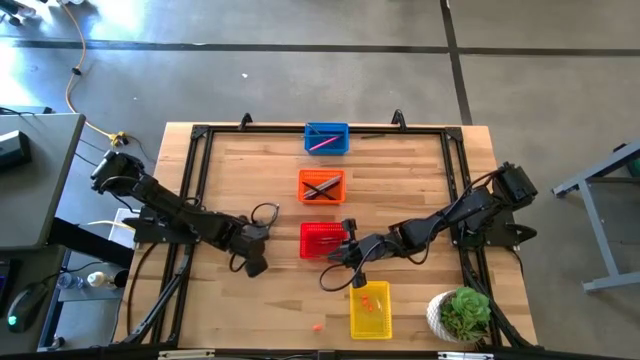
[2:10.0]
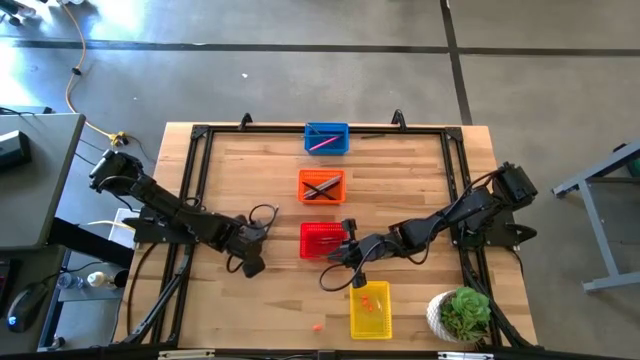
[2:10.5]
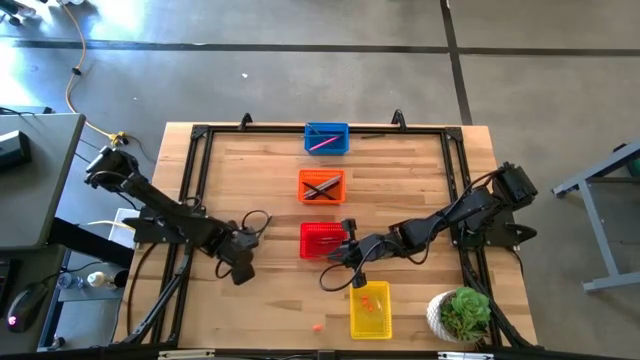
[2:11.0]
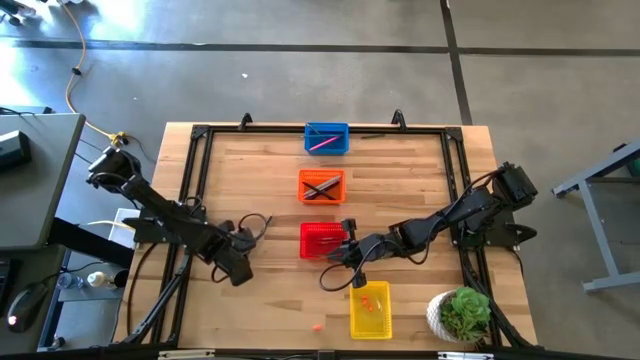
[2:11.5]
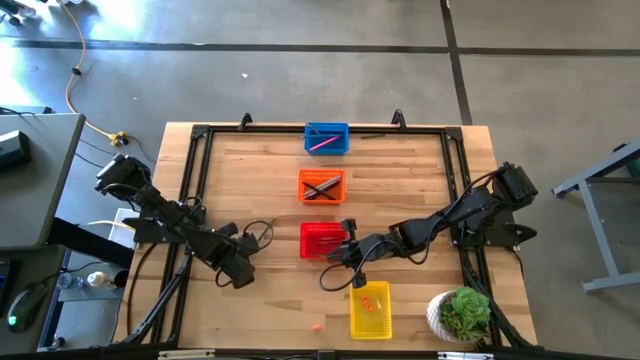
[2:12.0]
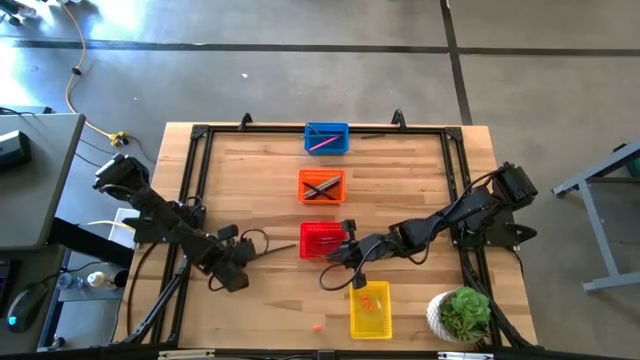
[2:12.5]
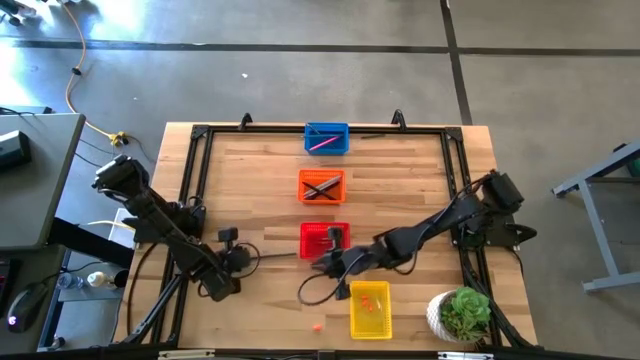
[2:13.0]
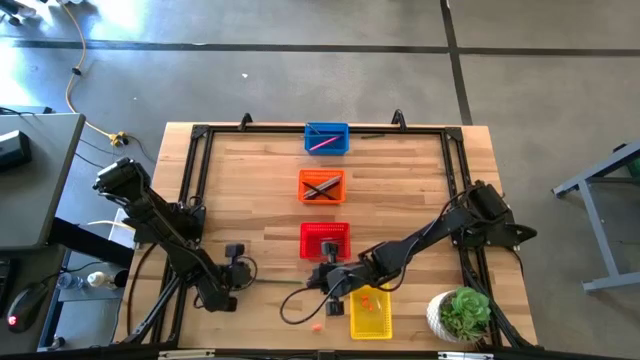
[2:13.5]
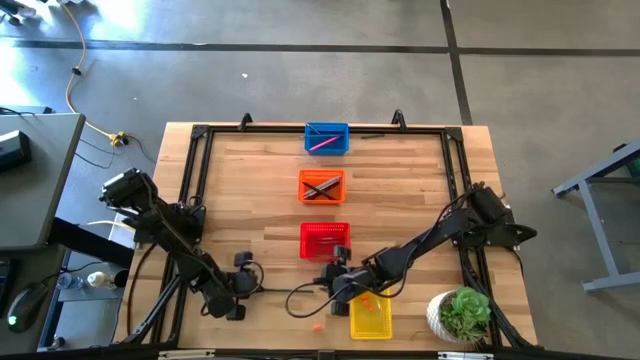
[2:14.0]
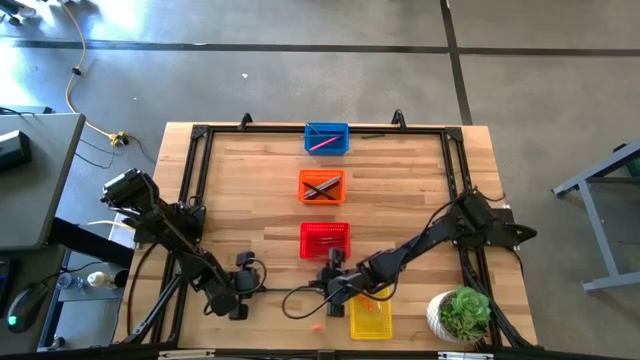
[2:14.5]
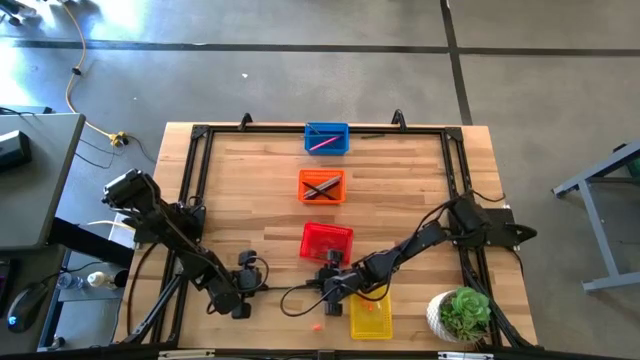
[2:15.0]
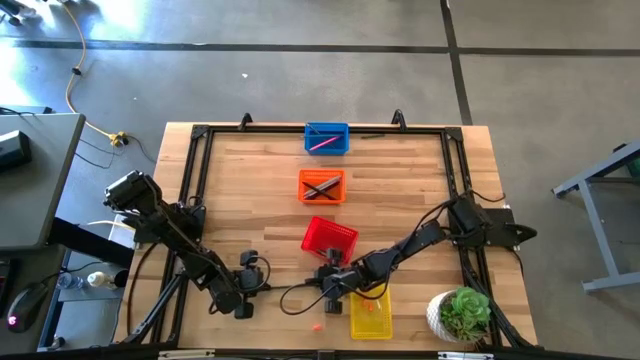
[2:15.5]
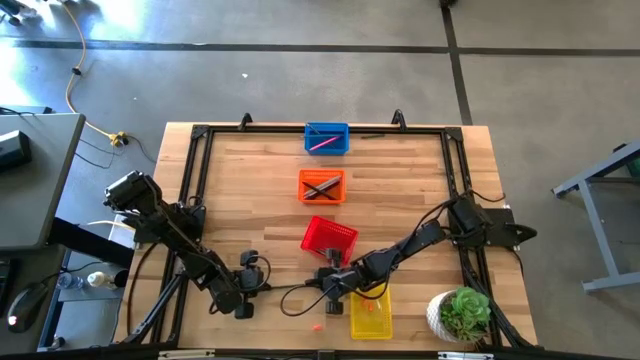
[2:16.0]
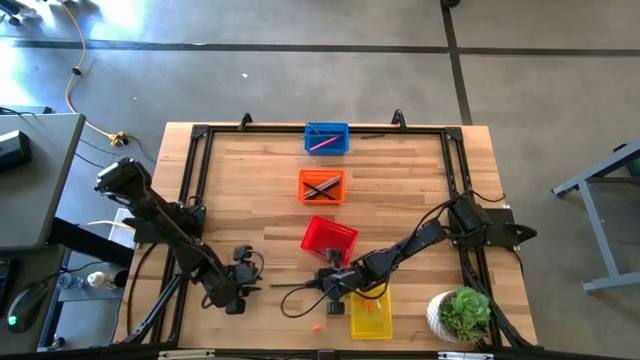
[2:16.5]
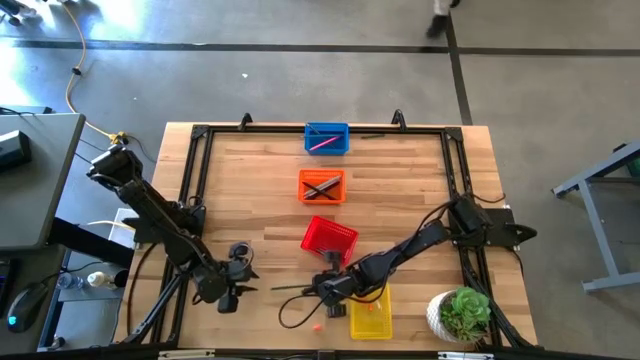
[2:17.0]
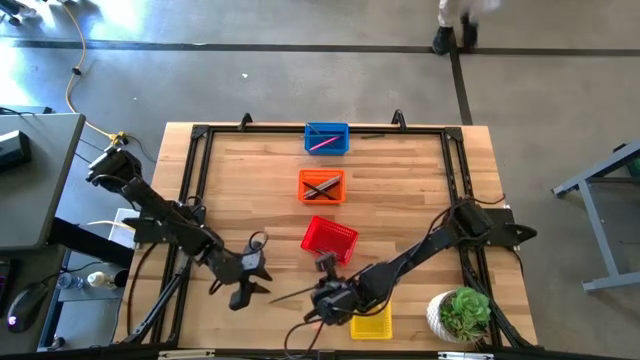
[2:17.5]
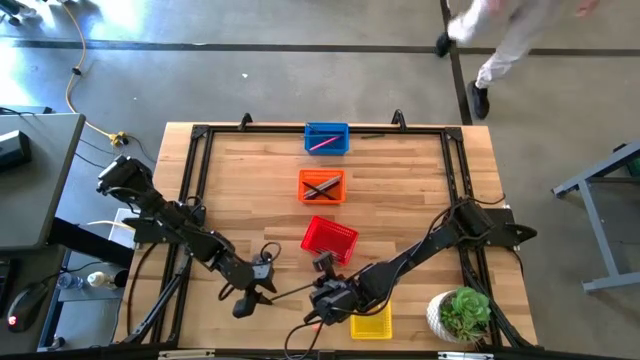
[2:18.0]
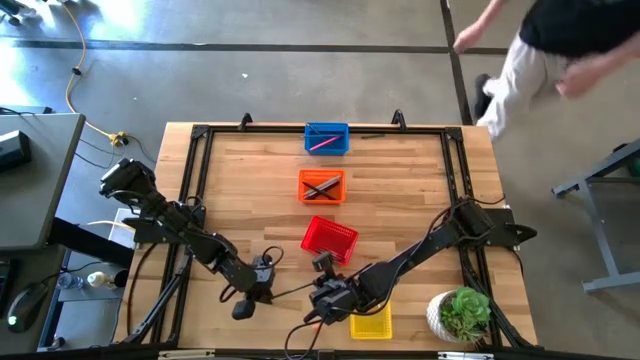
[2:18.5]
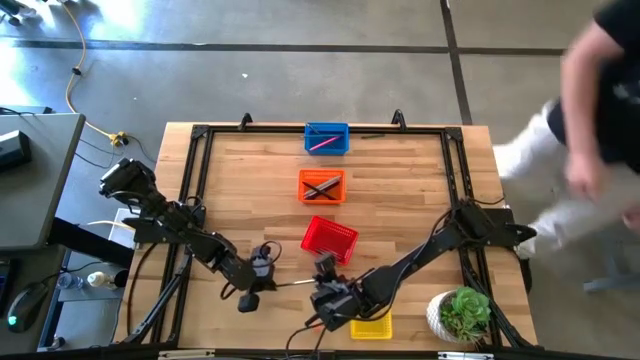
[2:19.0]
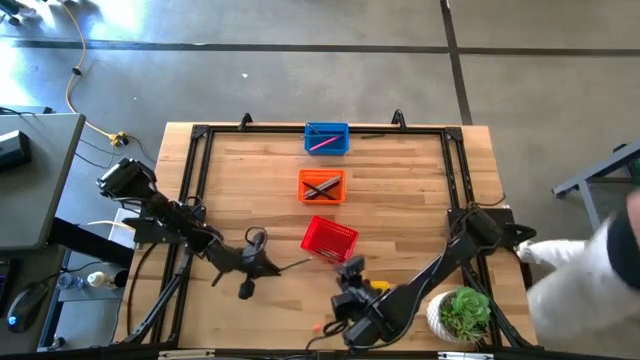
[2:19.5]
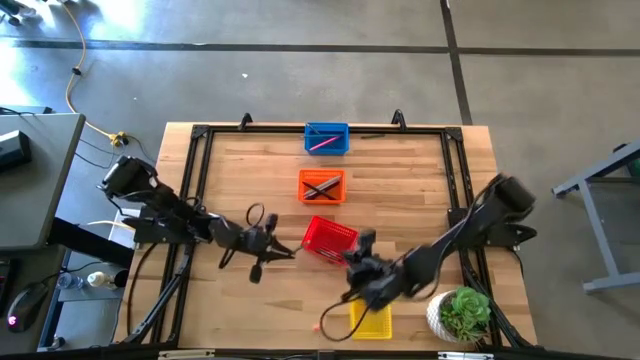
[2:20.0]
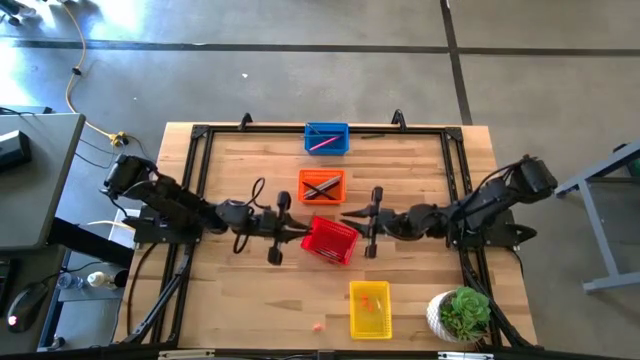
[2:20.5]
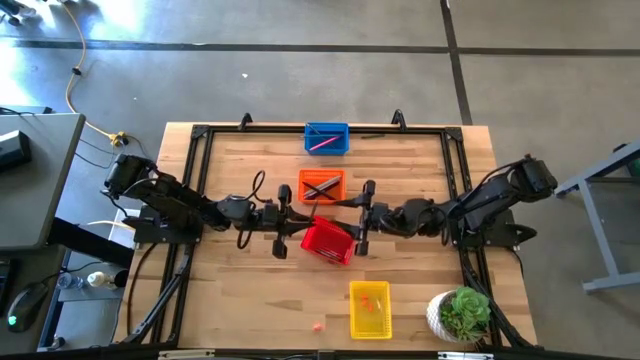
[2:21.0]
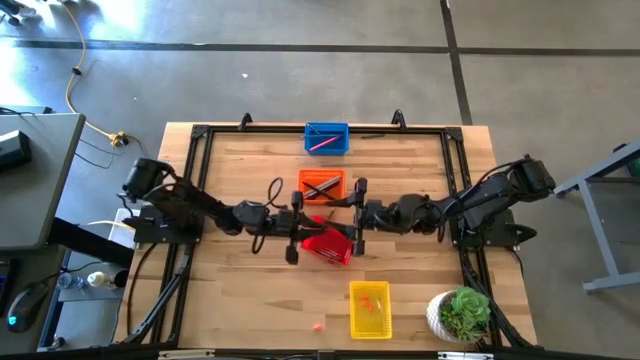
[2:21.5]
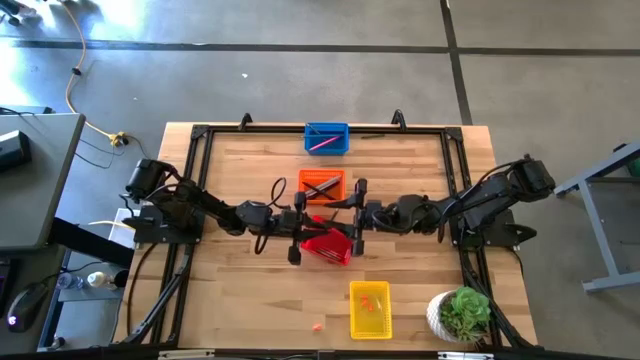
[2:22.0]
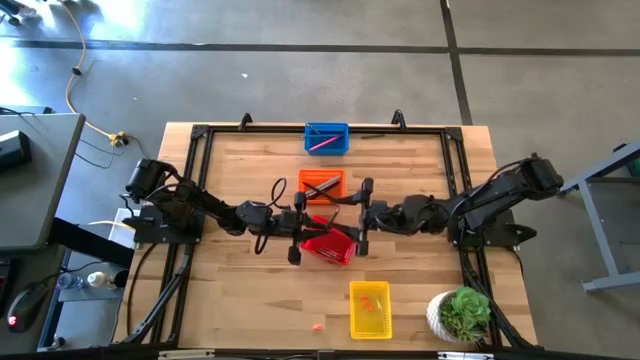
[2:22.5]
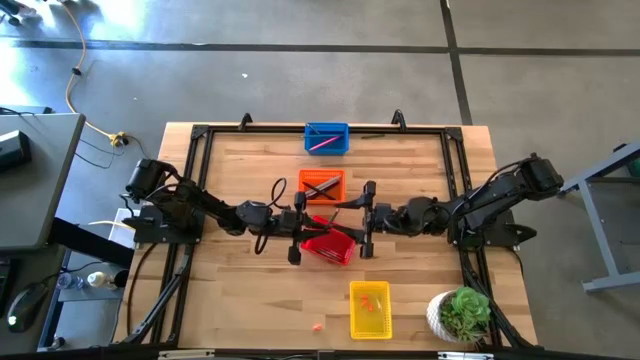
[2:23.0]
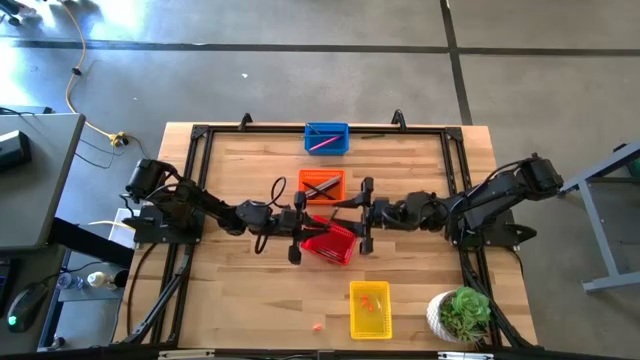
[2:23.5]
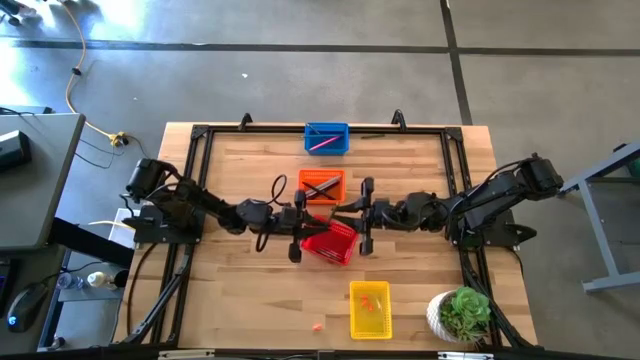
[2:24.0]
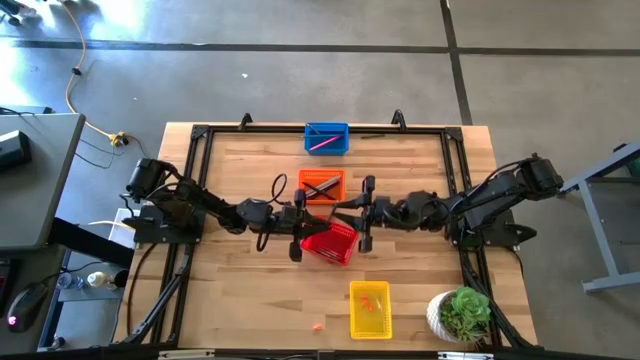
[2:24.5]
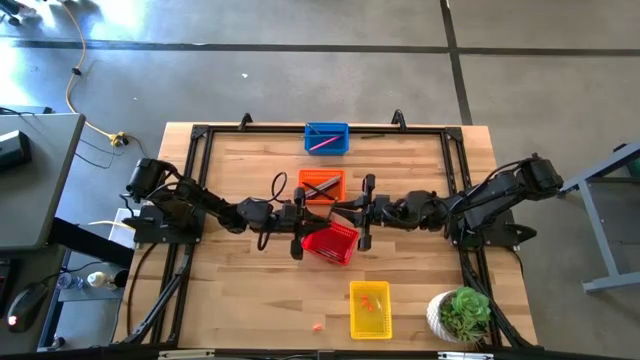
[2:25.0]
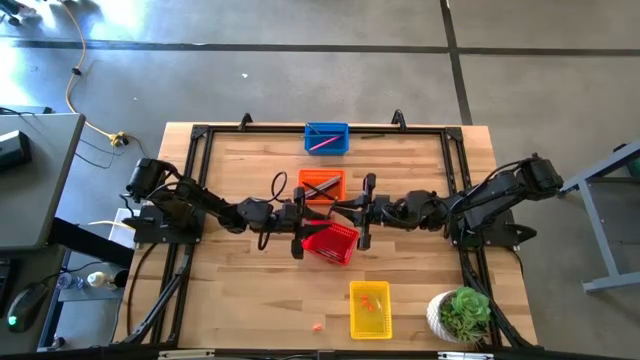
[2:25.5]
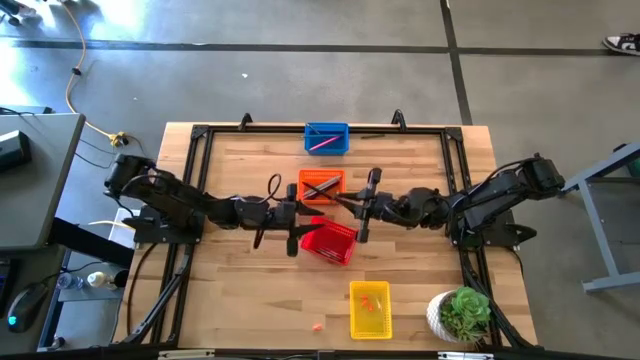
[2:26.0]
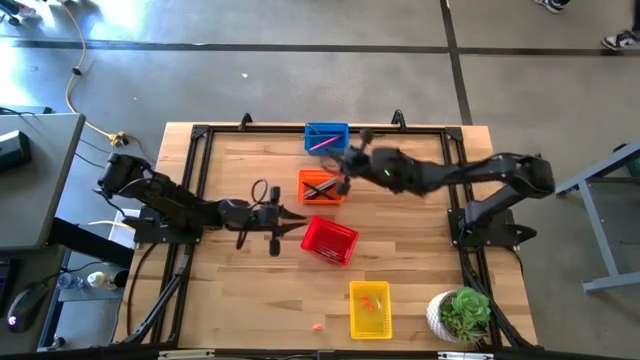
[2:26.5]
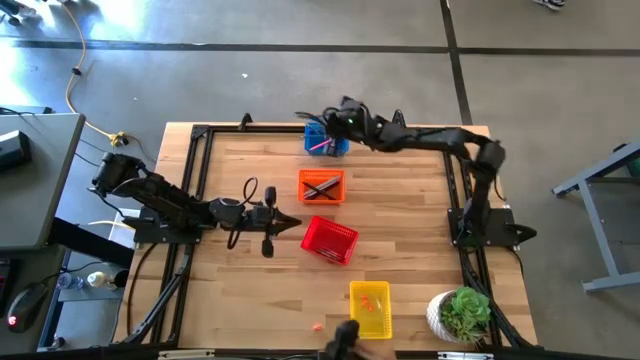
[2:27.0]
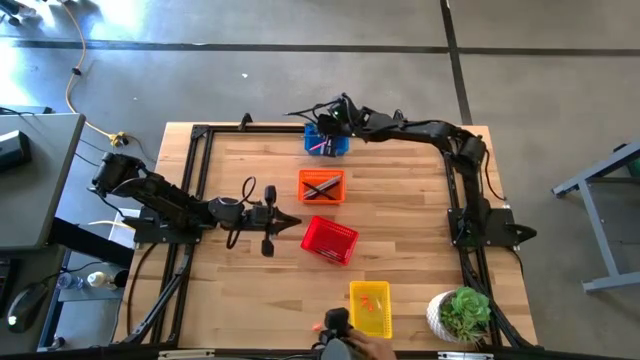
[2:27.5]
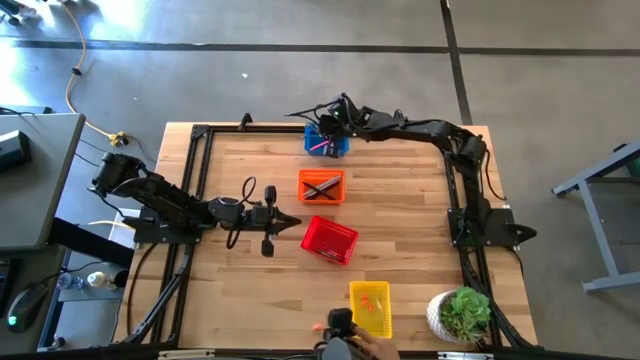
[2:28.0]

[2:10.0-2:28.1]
Task: Sort crayons/erasers/pens/pencils in bins
Put the green pencil into the blue bin

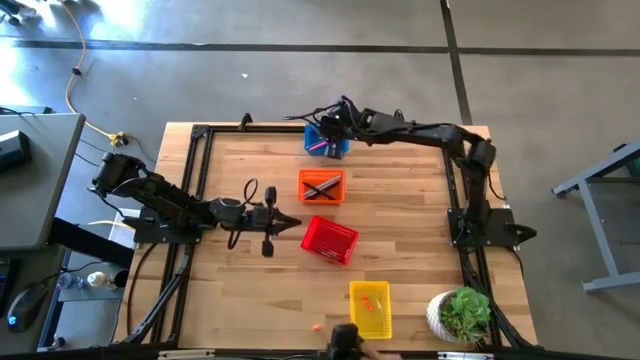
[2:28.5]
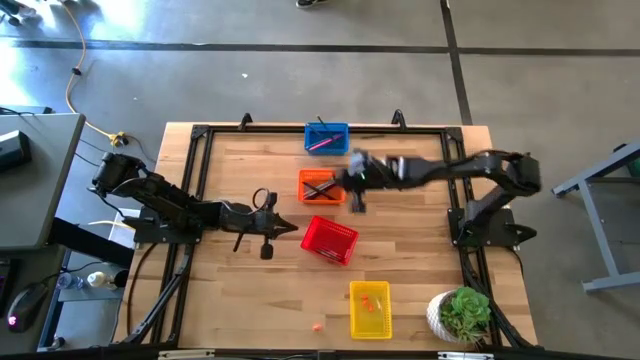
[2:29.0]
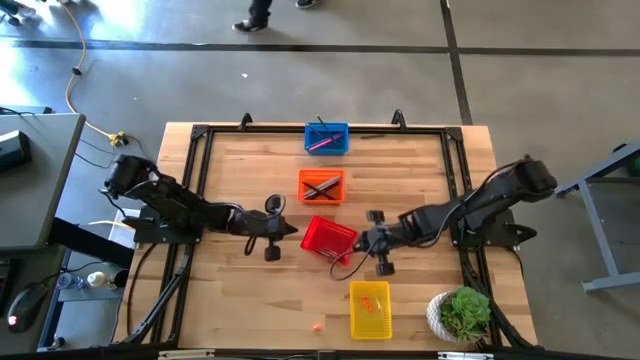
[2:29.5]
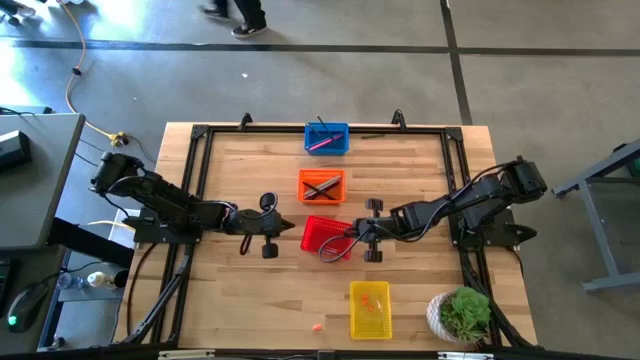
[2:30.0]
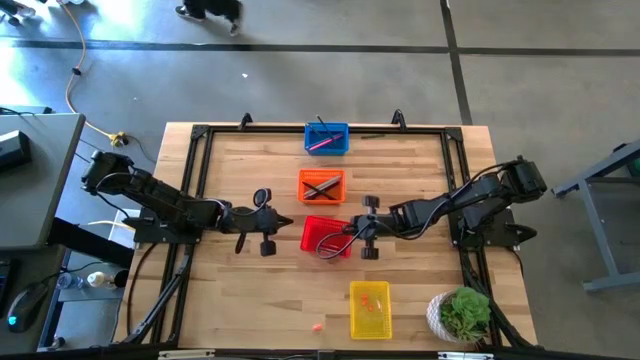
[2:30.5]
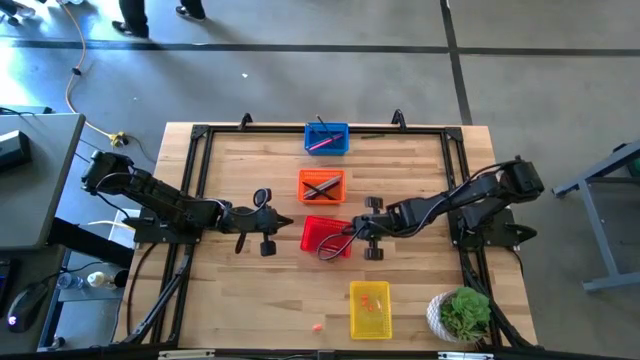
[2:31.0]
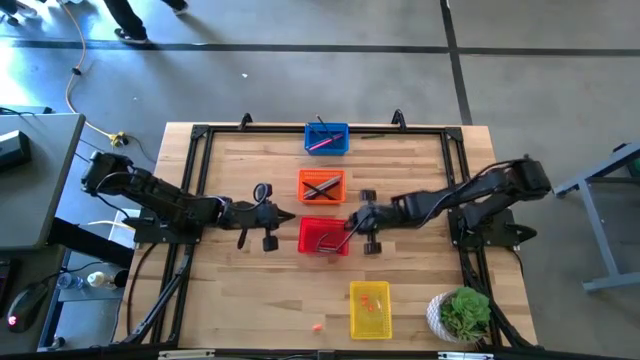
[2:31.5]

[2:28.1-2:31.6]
Adjust the red bin

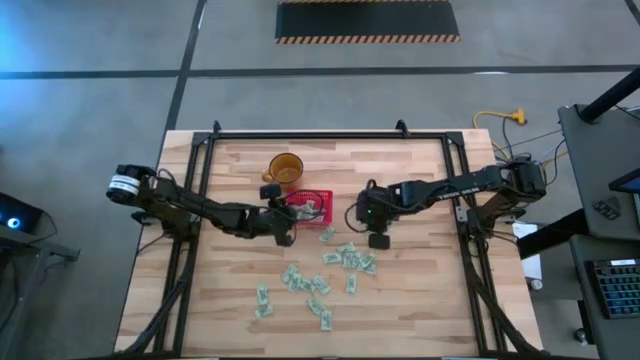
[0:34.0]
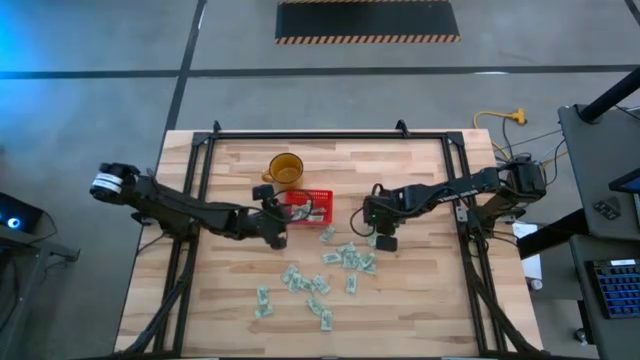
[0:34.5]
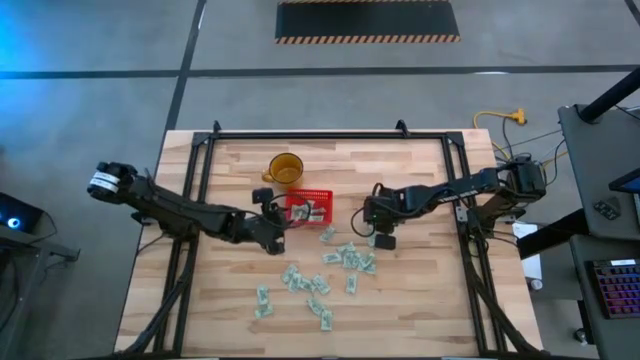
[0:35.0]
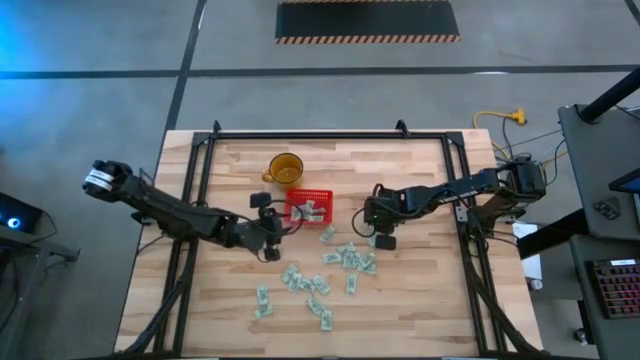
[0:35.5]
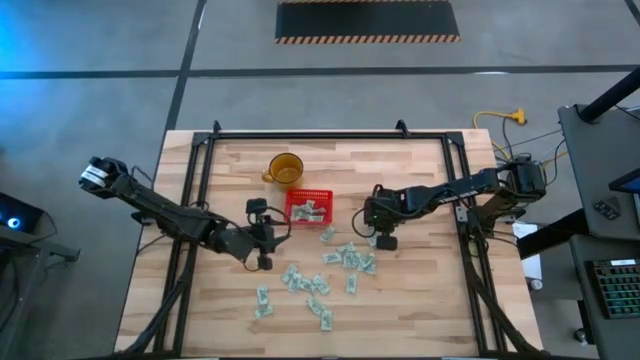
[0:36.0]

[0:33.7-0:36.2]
Task: Pick and place Stevia / Truvia into bins
Put the gray stevia packet into the red basket
